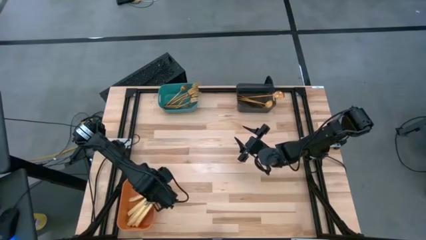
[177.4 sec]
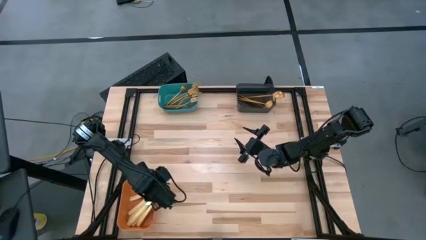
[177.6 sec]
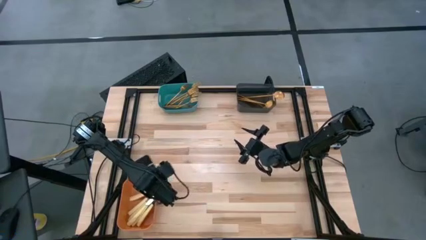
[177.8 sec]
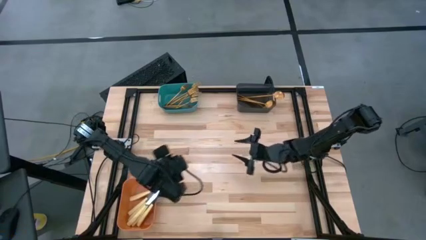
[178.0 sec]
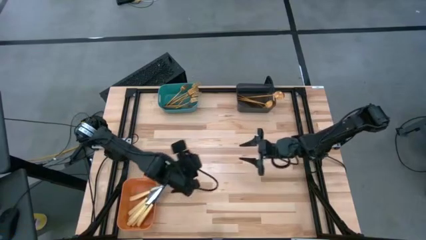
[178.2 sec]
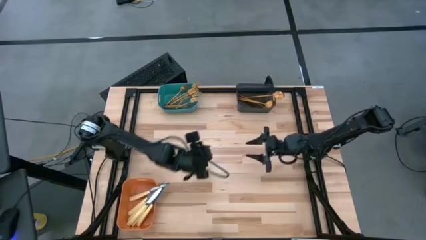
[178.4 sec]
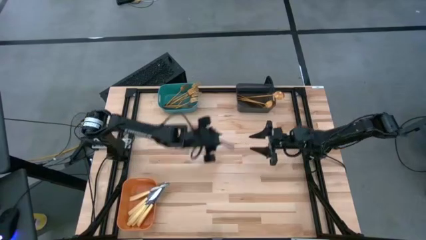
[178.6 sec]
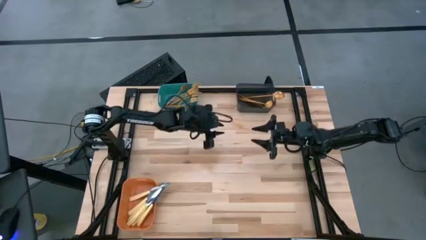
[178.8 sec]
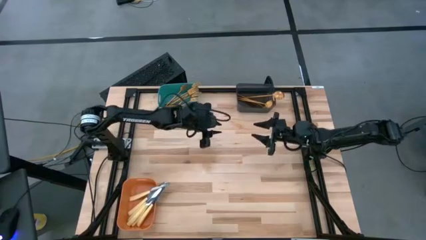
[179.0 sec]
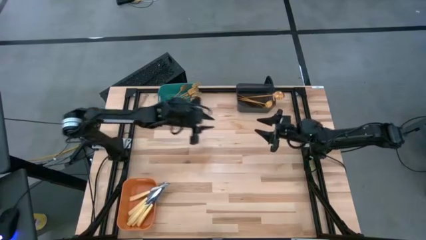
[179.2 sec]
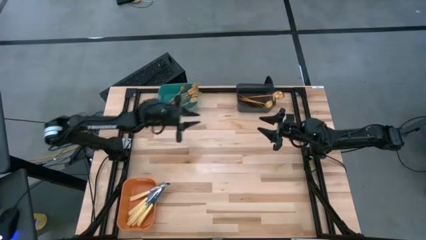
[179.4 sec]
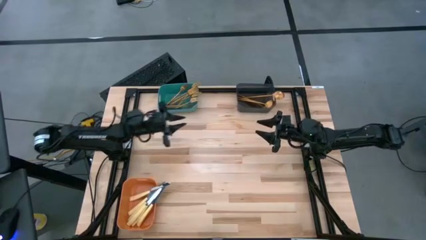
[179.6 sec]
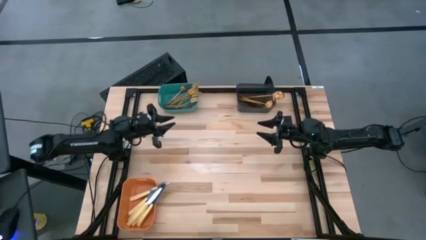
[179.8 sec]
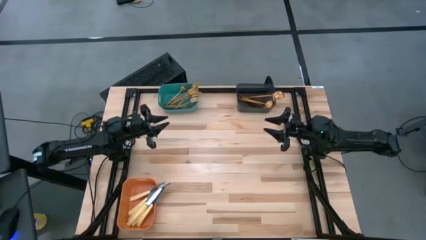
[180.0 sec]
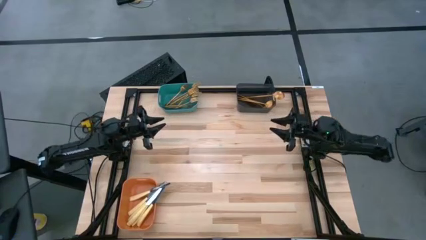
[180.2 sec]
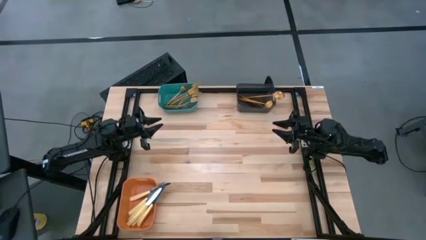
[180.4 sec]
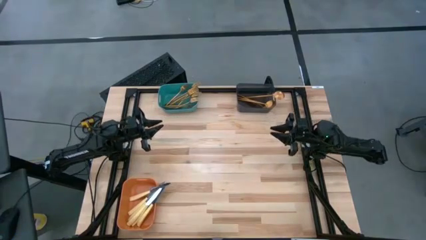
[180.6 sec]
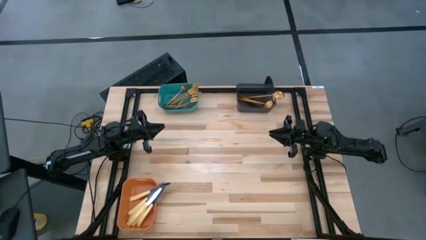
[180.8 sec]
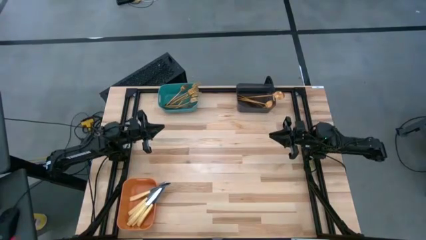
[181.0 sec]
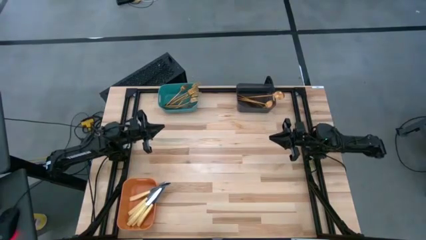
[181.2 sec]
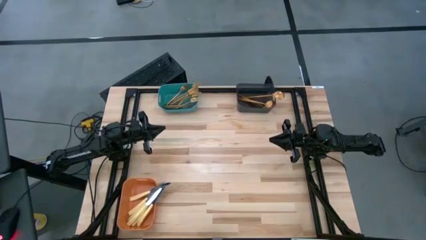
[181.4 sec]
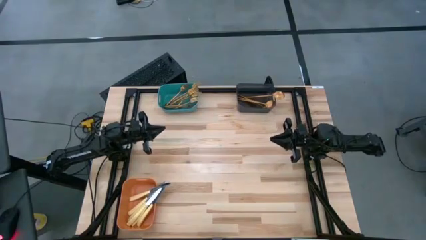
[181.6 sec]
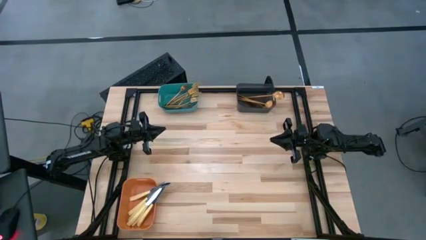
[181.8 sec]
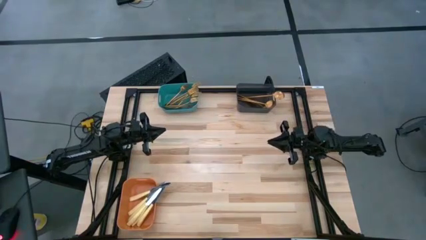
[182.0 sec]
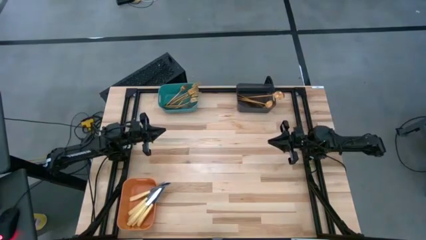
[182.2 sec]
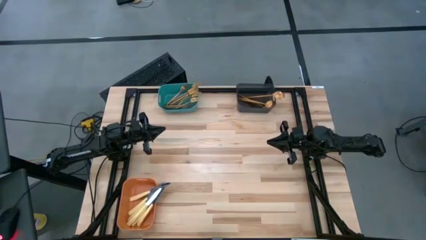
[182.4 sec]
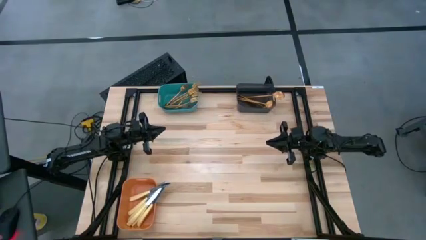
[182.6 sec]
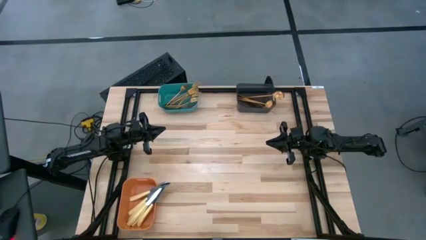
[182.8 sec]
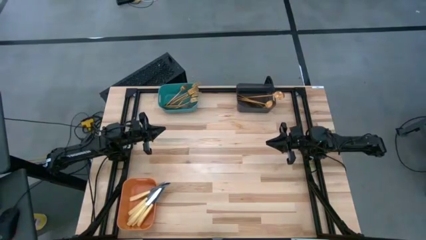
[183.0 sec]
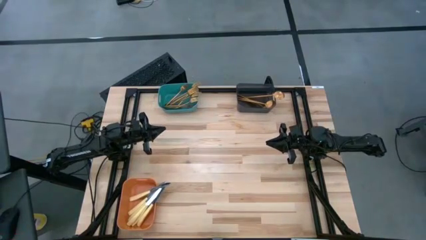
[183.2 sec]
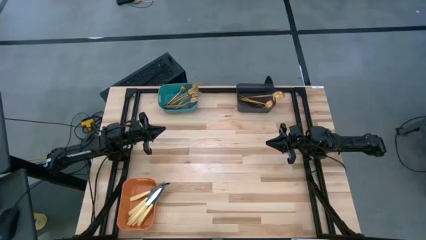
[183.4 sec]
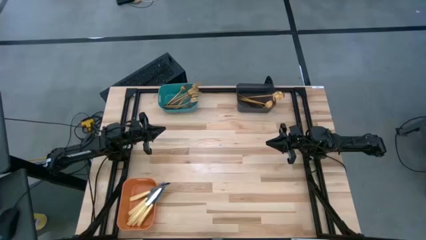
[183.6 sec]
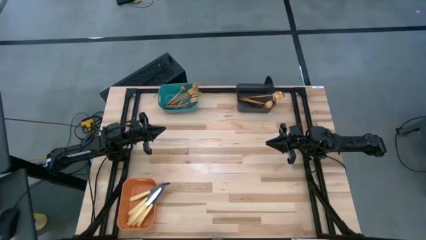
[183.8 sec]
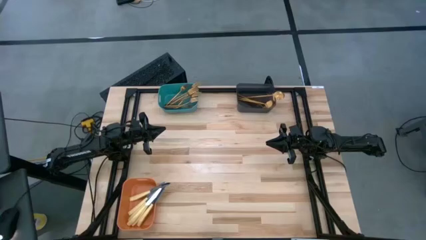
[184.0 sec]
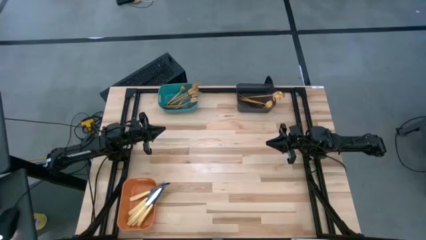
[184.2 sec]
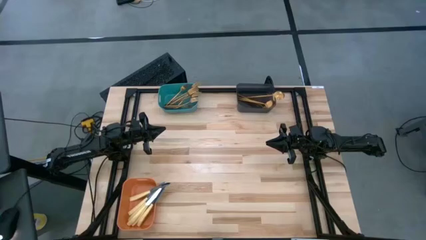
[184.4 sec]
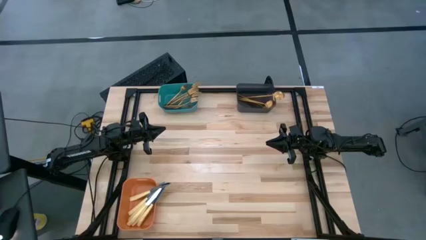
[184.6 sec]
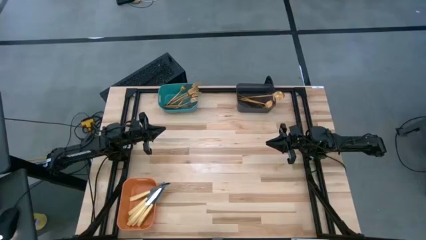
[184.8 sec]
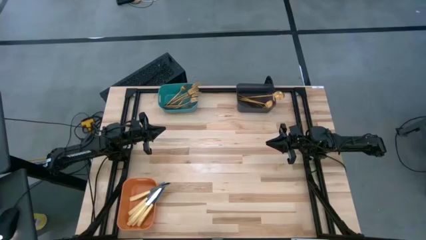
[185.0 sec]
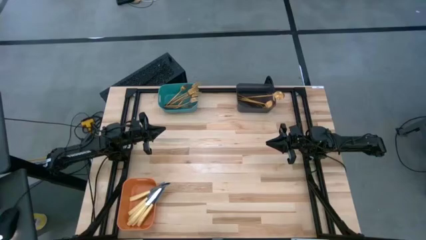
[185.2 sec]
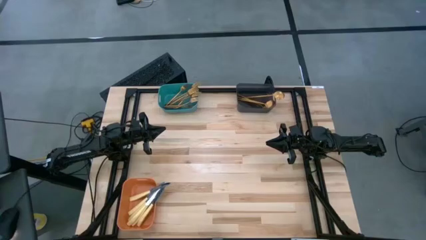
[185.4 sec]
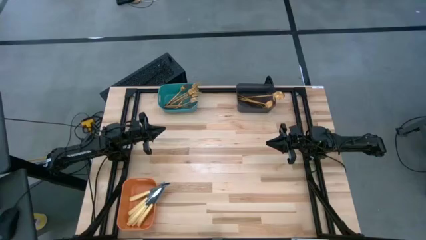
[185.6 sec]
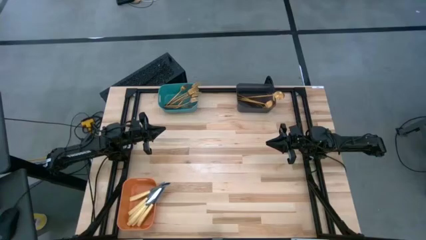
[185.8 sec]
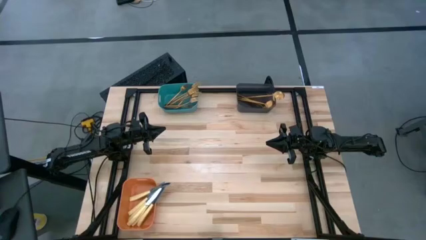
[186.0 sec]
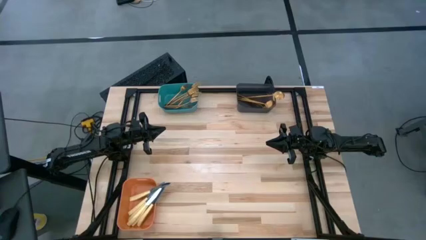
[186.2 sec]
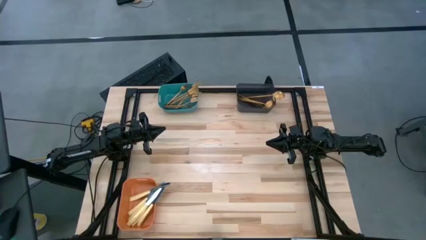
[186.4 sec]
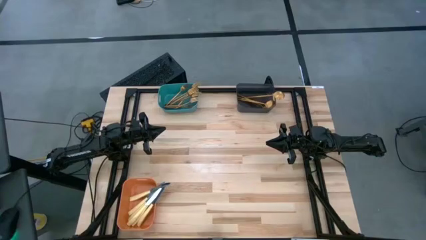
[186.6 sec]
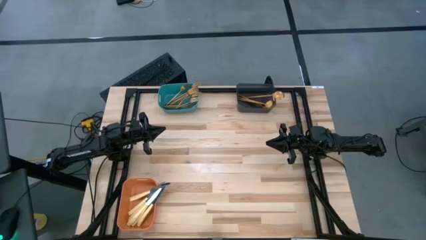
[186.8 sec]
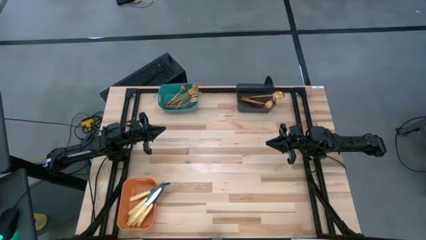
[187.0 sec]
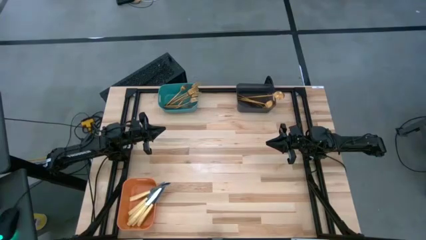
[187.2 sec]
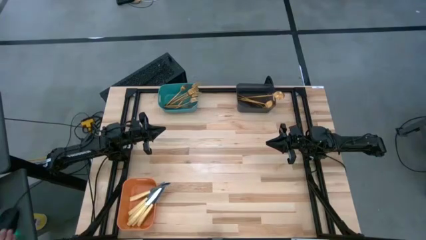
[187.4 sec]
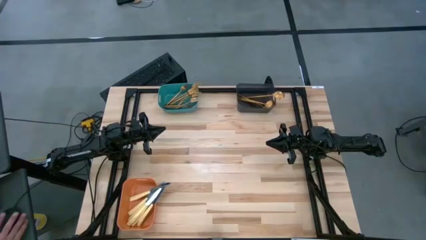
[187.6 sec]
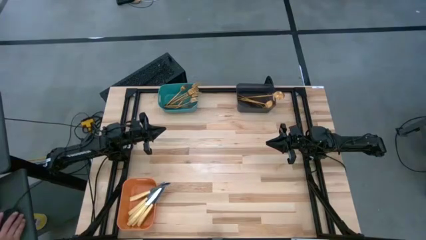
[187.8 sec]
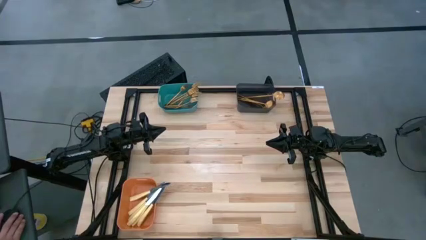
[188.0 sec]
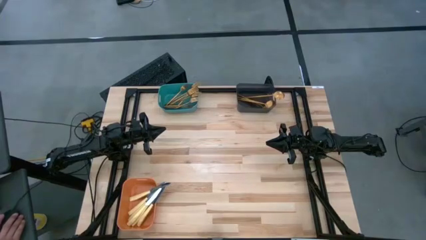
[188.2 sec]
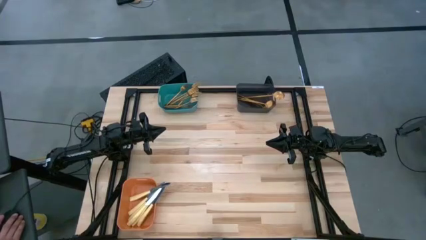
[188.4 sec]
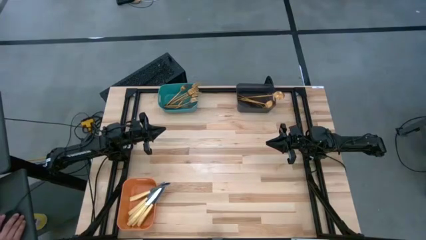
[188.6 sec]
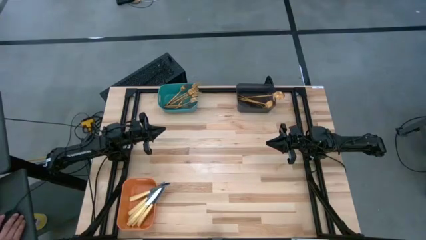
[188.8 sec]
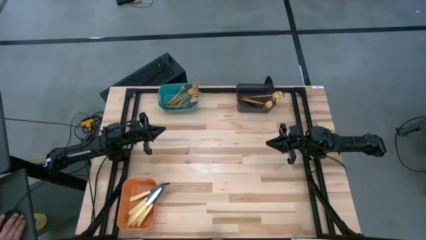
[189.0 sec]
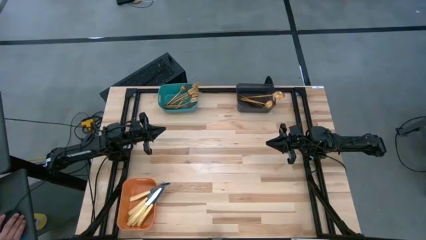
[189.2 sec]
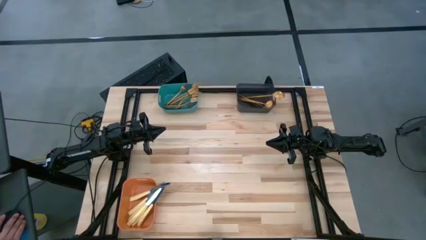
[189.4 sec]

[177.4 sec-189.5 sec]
Task: Sort silverware by color (type)
Return to Home Position
